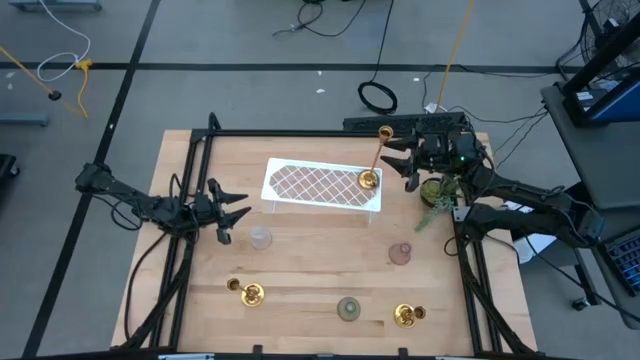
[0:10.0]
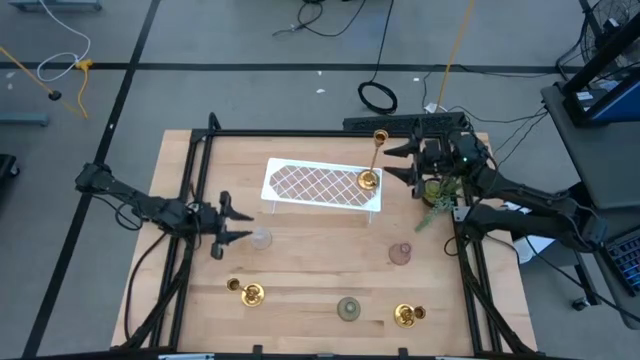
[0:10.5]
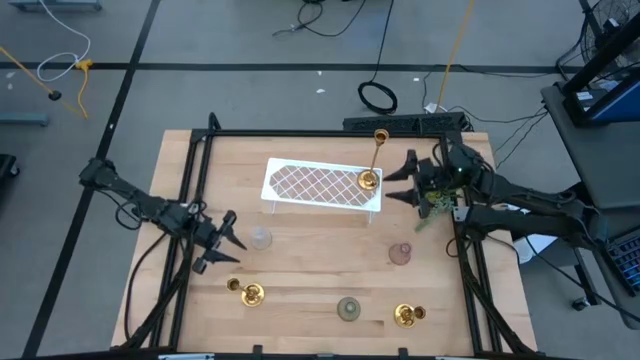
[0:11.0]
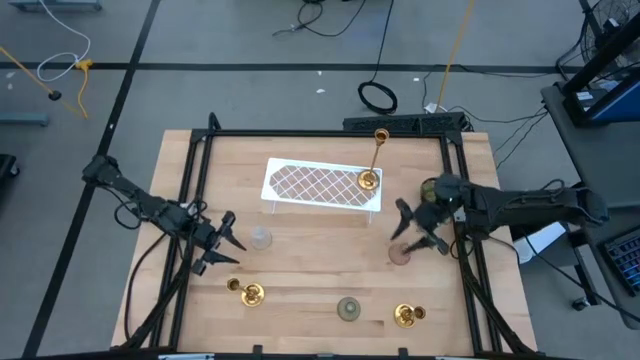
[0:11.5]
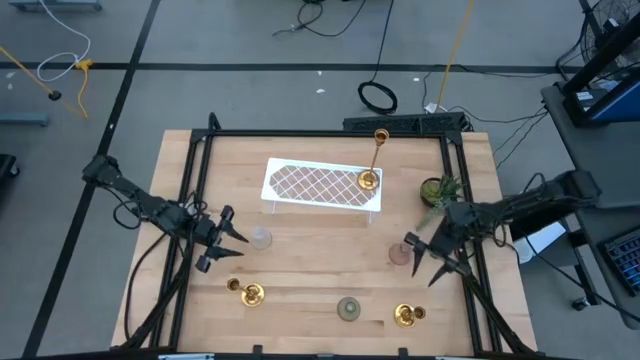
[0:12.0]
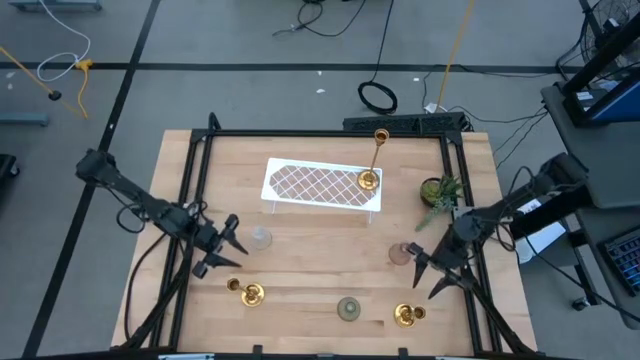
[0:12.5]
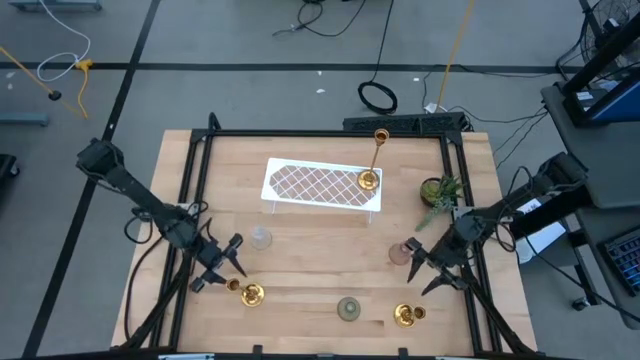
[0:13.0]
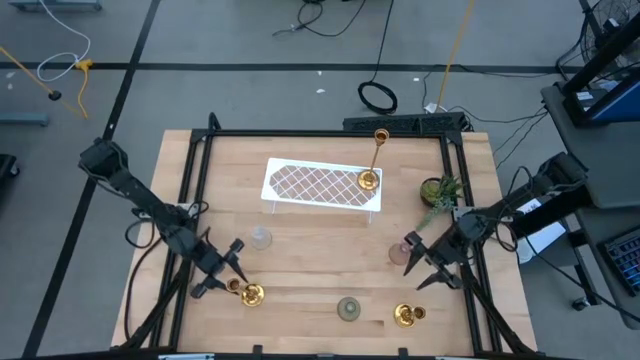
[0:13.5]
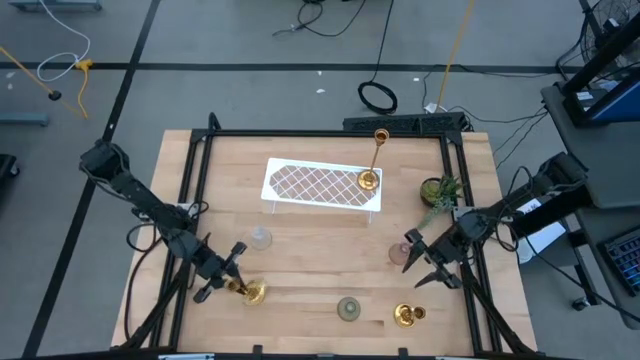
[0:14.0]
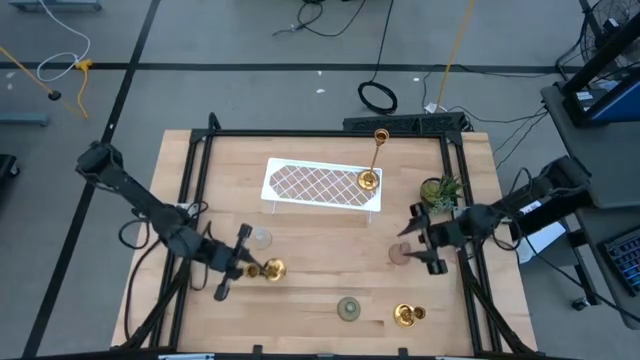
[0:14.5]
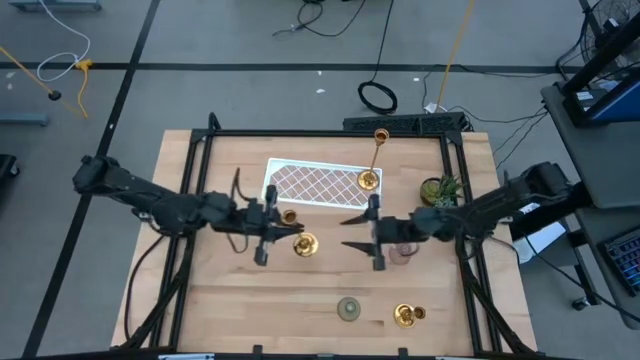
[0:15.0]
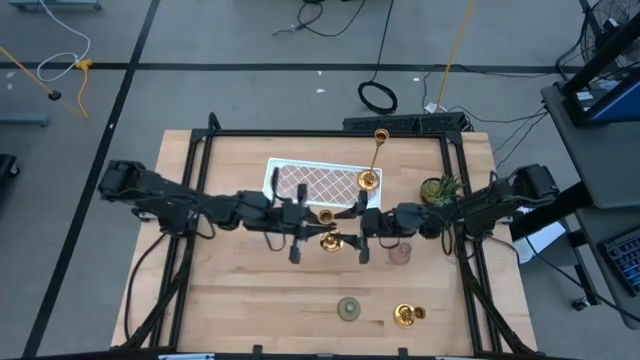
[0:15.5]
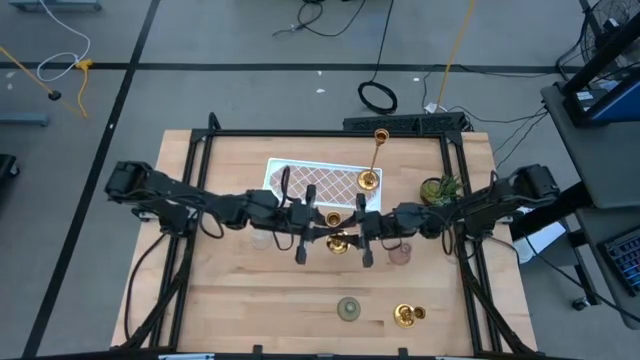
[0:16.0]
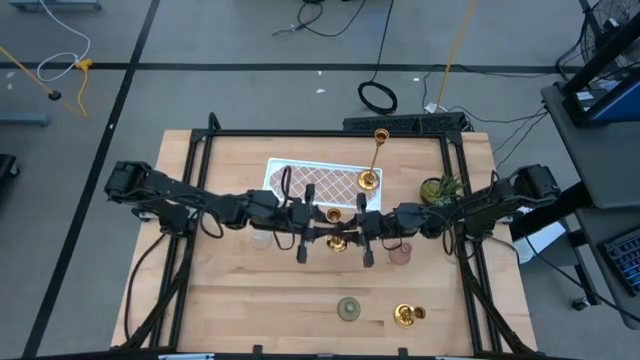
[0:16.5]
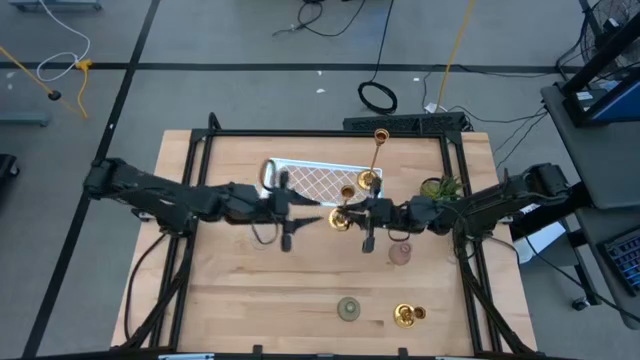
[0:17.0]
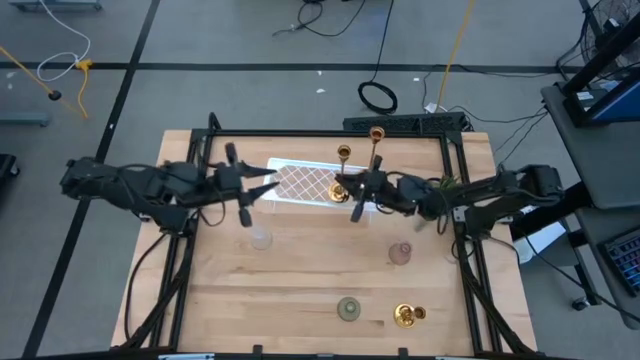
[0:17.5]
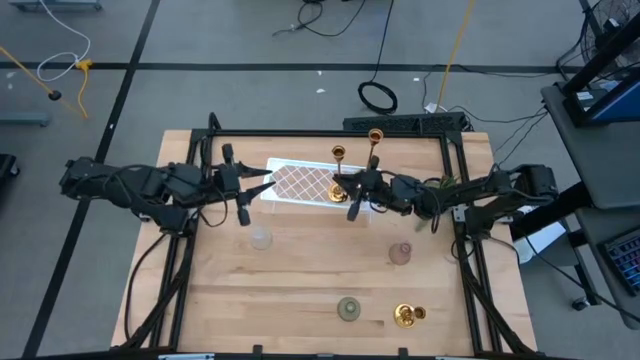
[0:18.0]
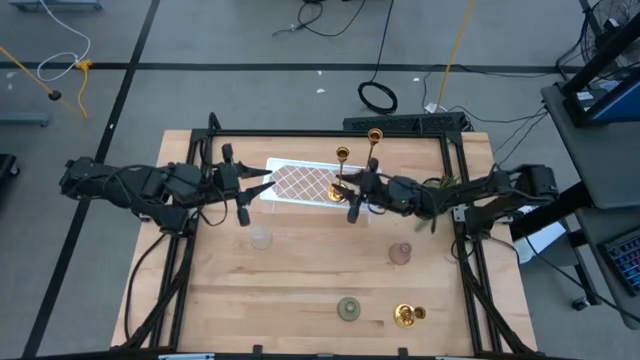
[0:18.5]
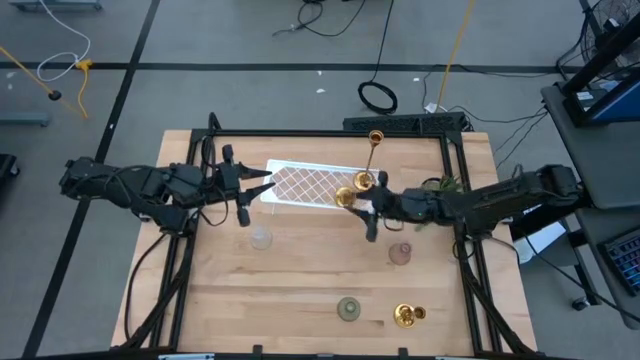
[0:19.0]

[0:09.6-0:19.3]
Task: Pick & Place candle stick holders
Put the left gold candle holder on the shelf

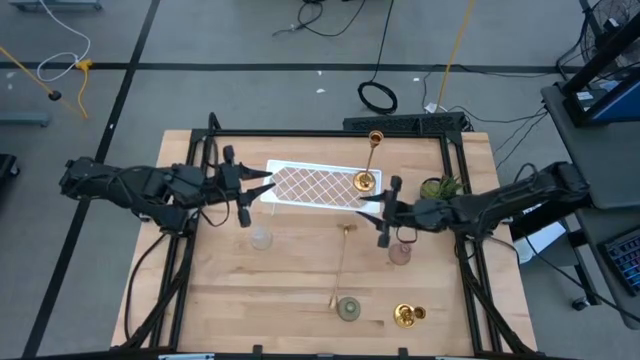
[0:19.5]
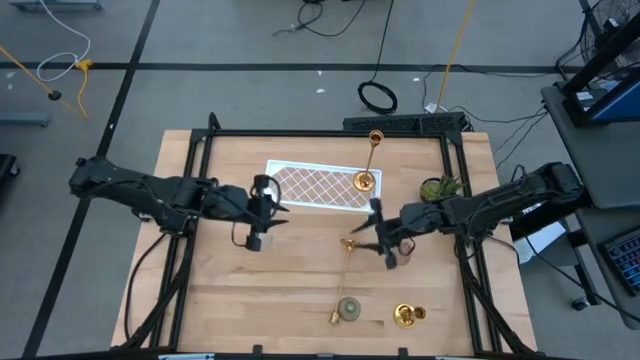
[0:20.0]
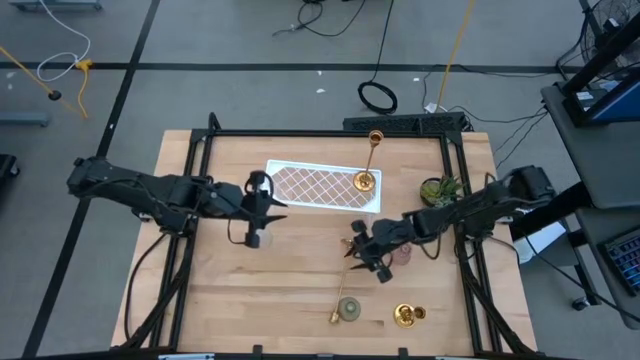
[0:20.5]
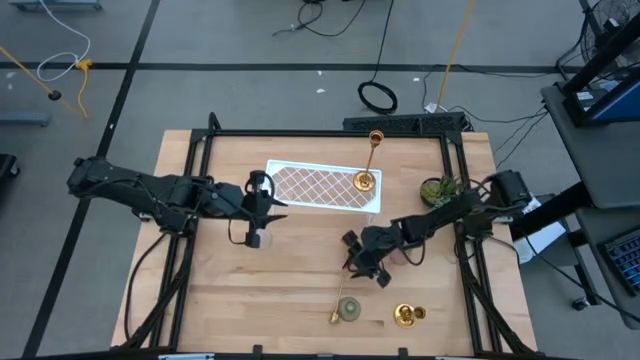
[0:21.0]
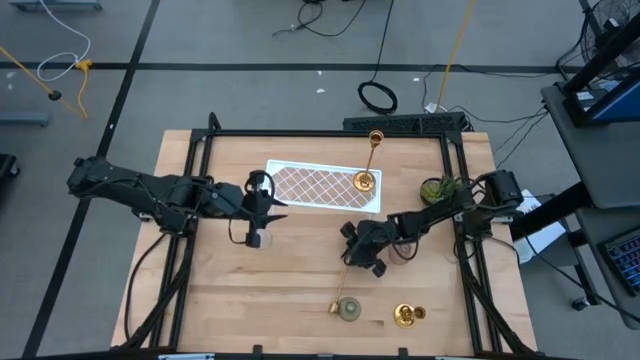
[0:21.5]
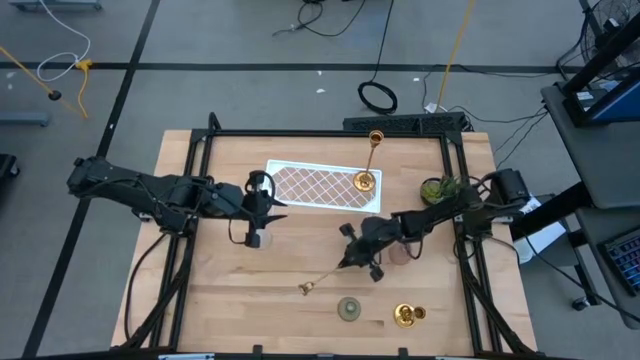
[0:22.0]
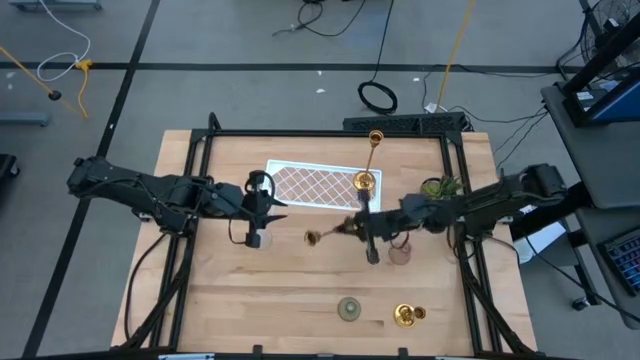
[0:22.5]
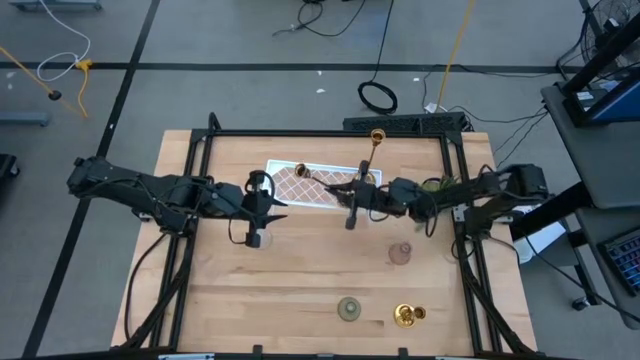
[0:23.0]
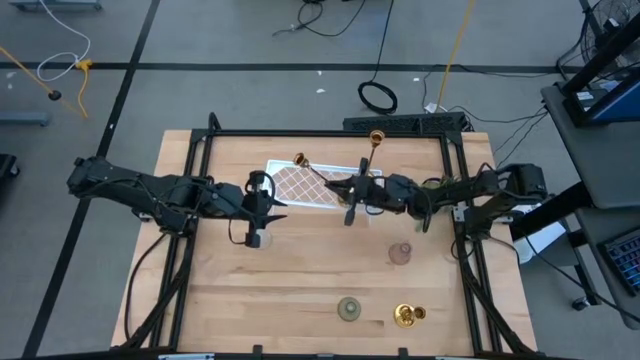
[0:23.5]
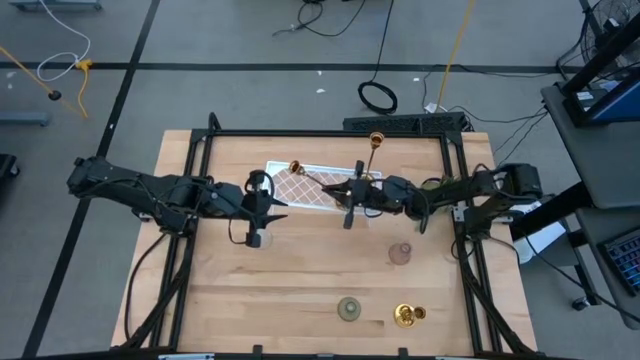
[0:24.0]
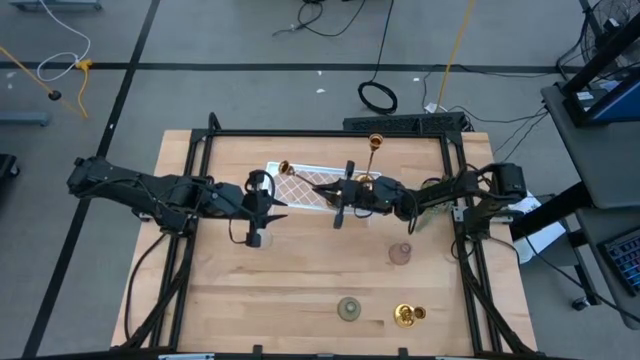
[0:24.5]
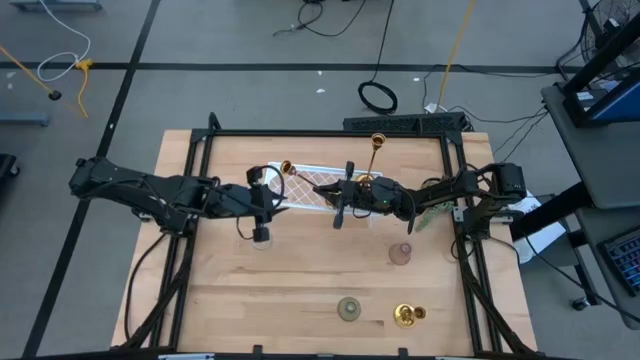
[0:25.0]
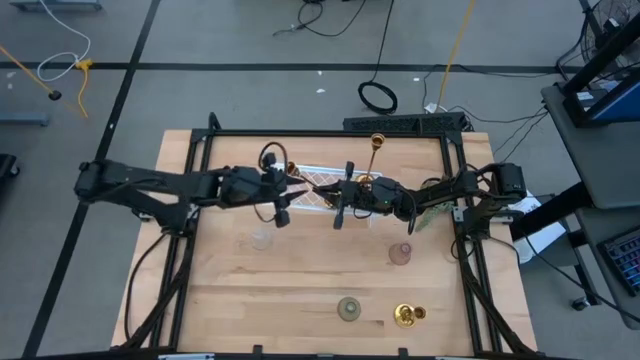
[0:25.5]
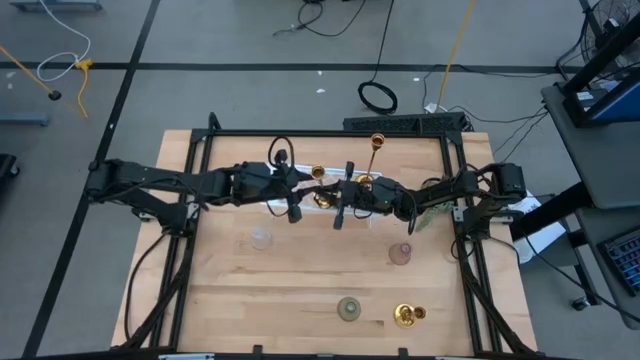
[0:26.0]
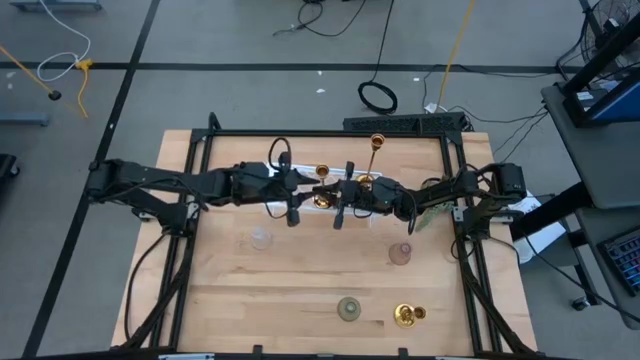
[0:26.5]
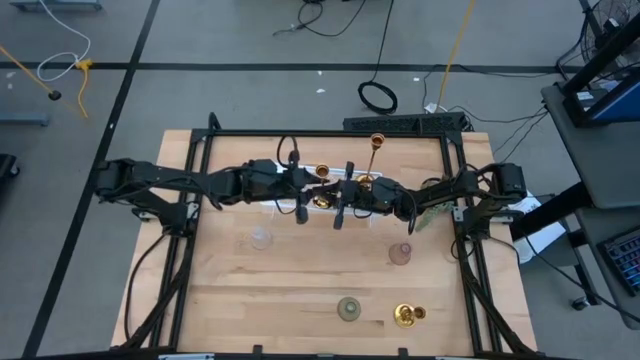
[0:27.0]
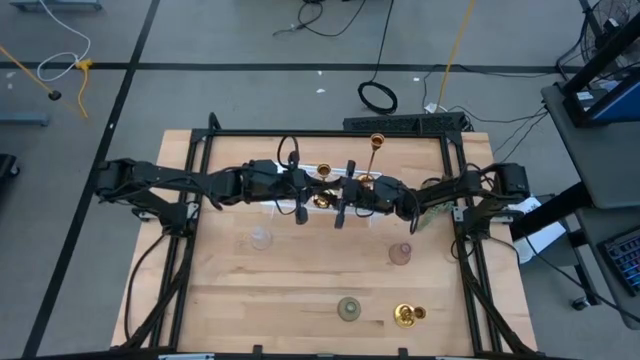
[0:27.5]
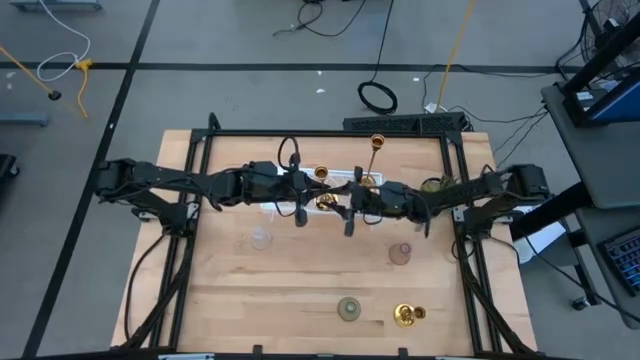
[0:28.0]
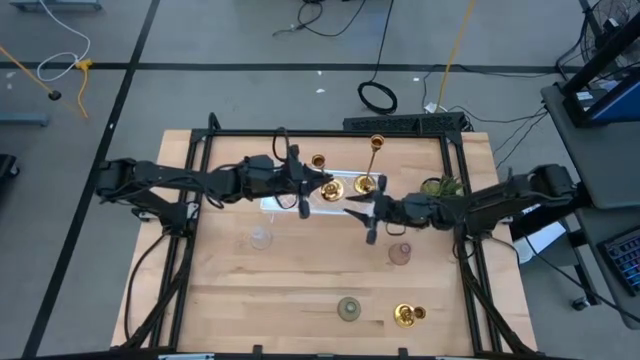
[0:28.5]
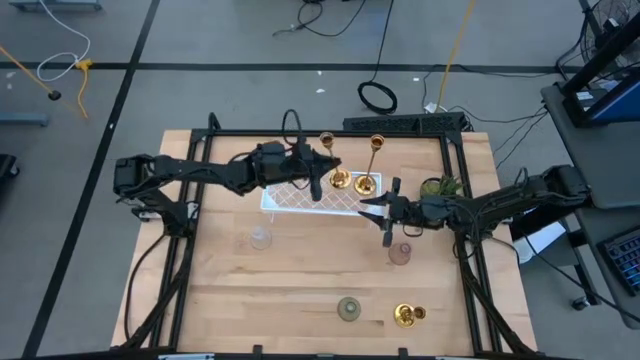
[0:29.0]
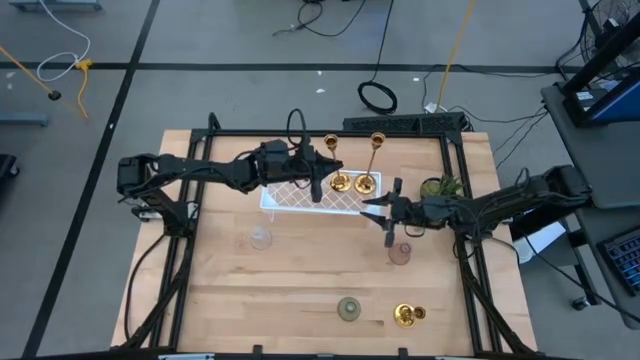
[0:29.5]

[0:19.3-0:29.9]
Put the left gold candle holder on the shelf

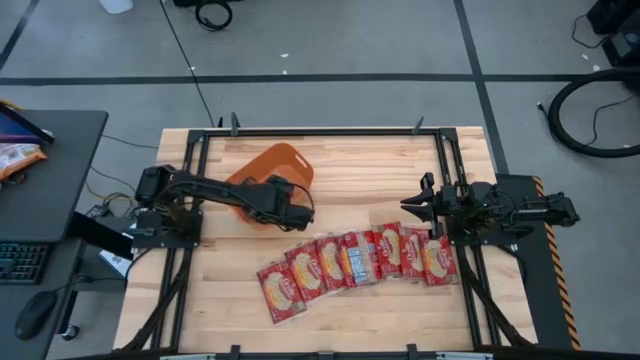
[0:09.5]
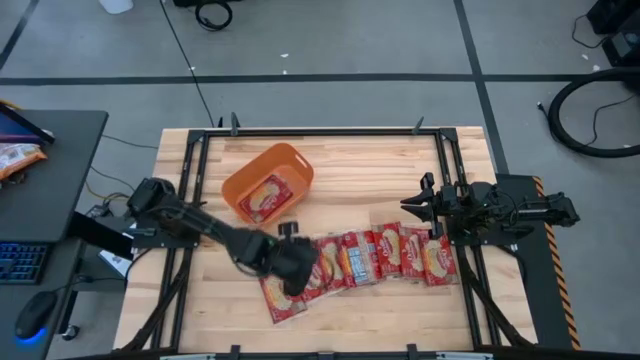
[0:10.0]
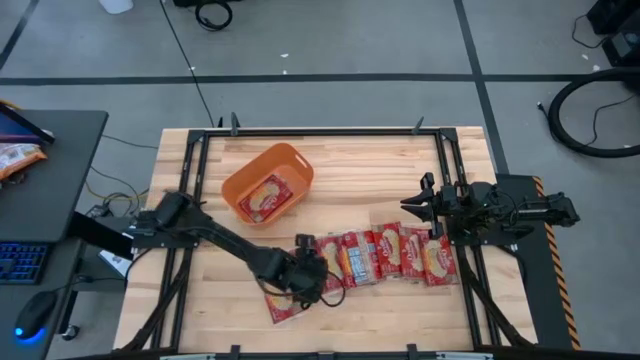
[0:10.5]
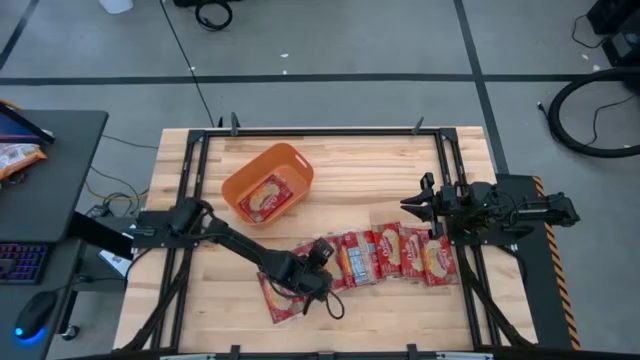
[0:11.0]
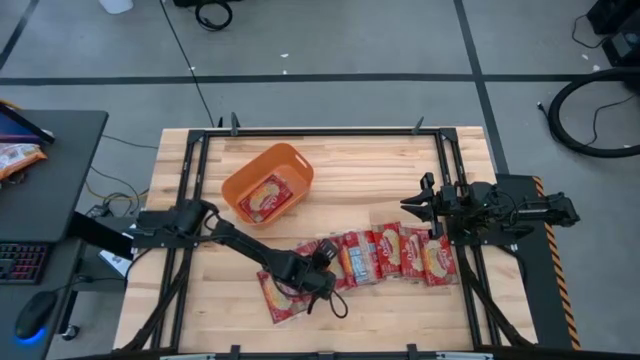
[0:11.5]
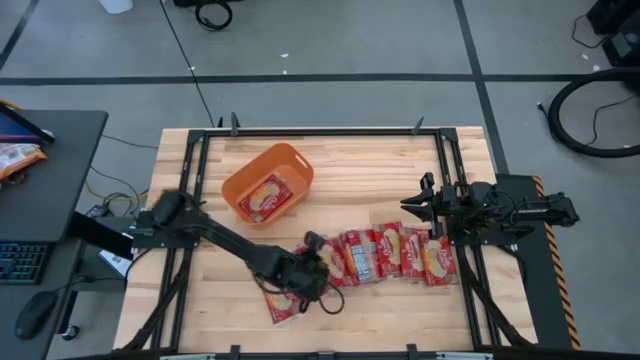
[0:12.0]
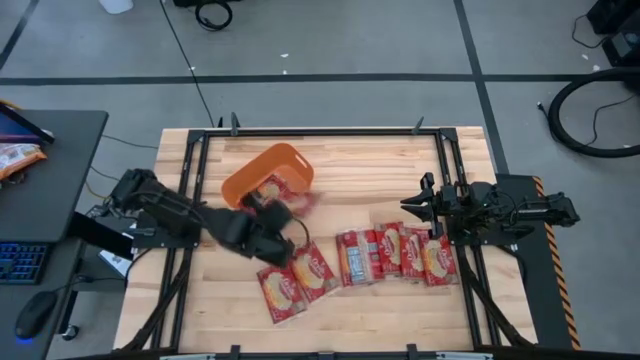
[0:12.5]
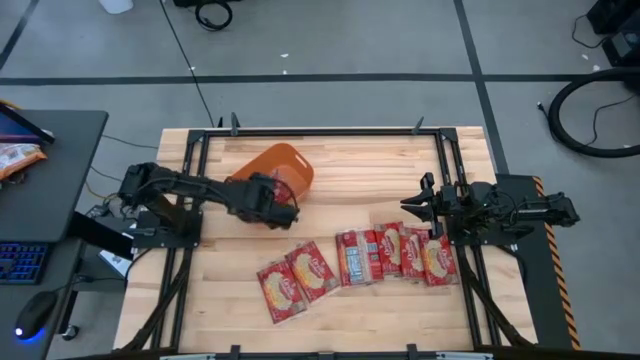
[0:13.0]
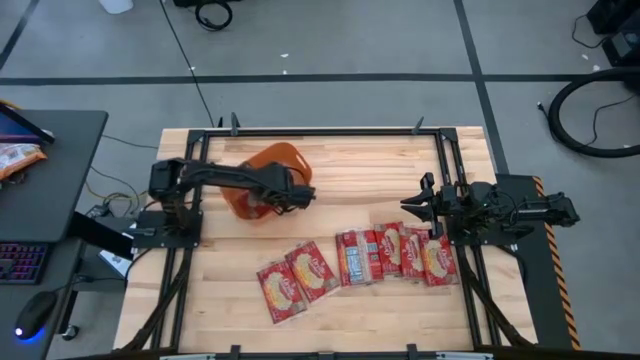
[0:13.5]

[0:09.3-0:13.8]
Task: Sort popcorn bags into baskets
Put the popcorn bag into the orange bin
